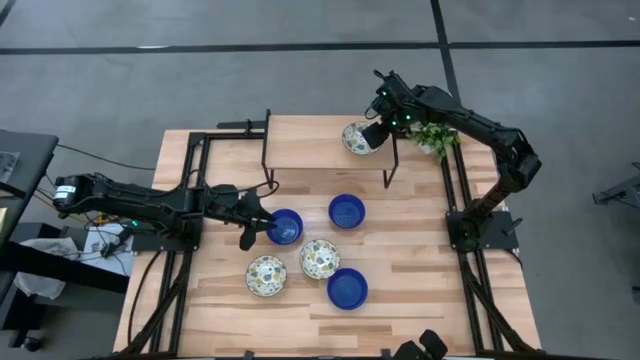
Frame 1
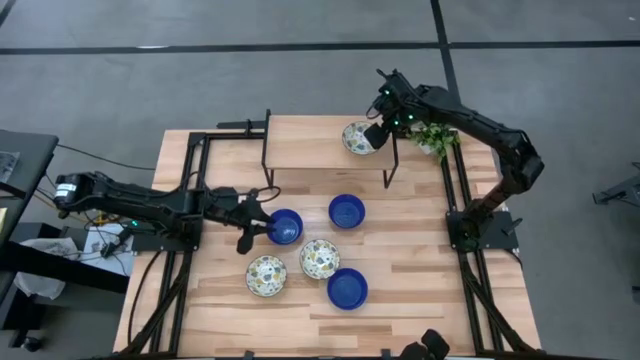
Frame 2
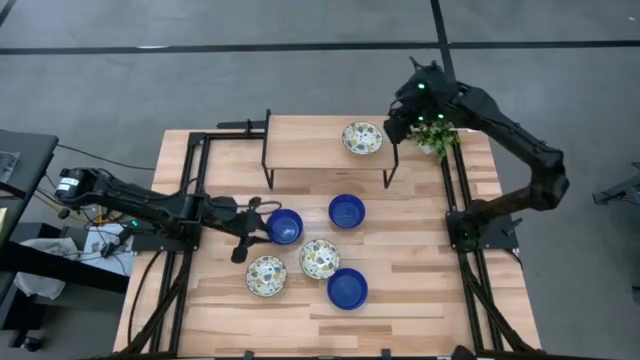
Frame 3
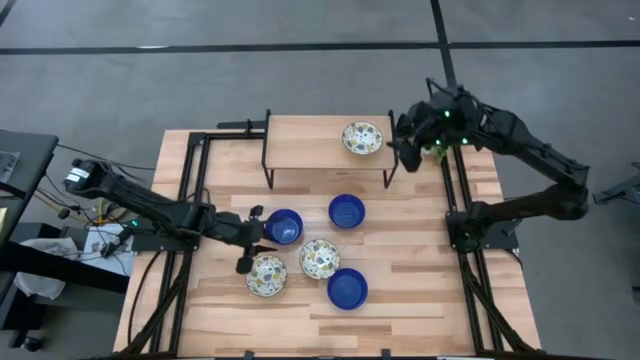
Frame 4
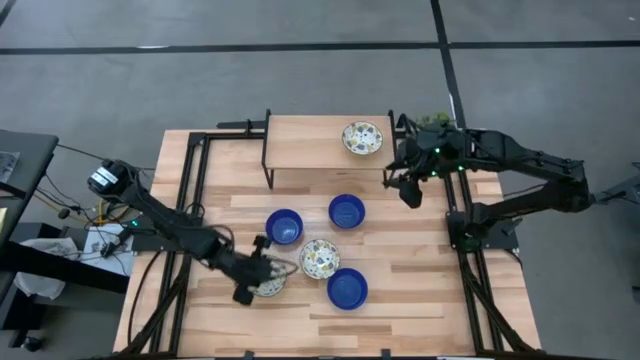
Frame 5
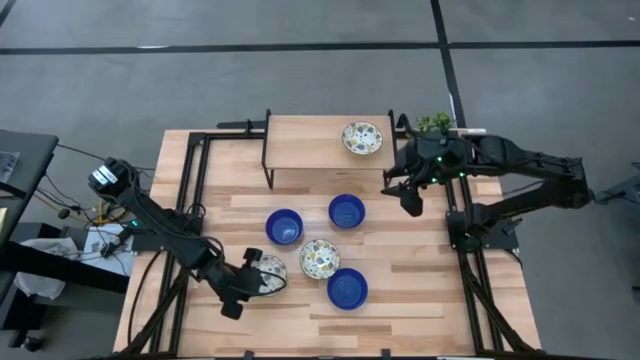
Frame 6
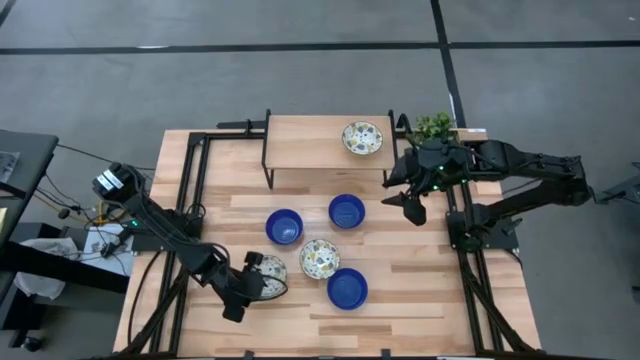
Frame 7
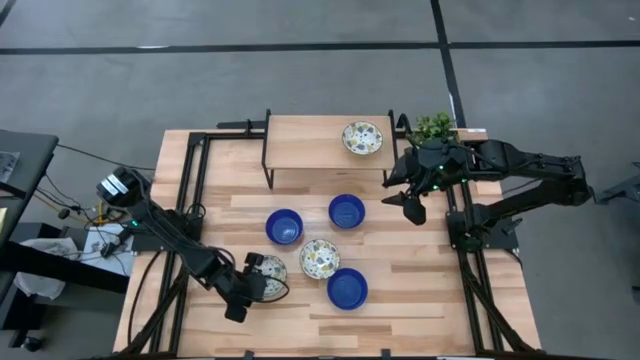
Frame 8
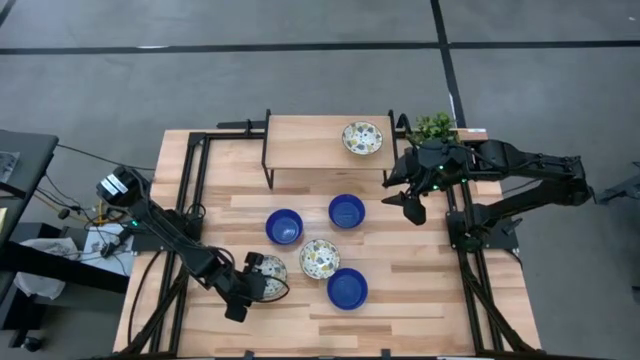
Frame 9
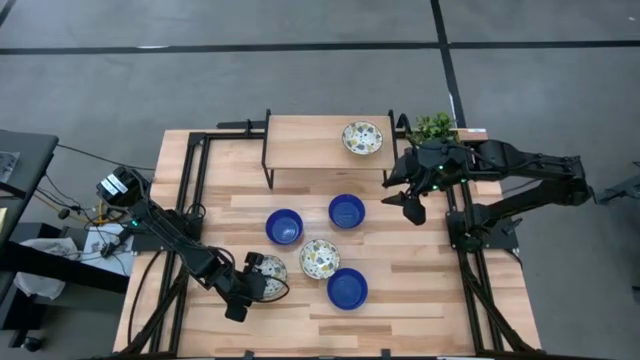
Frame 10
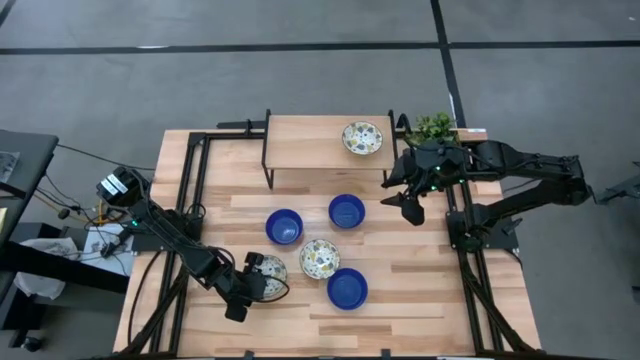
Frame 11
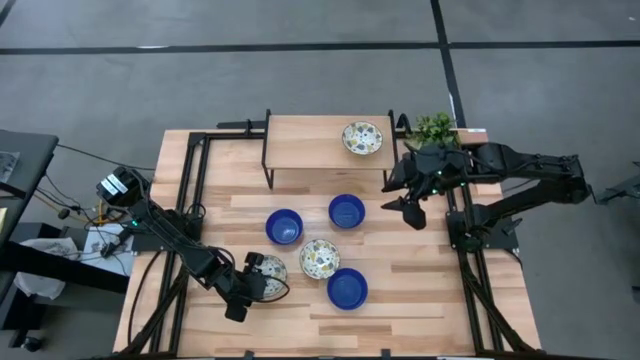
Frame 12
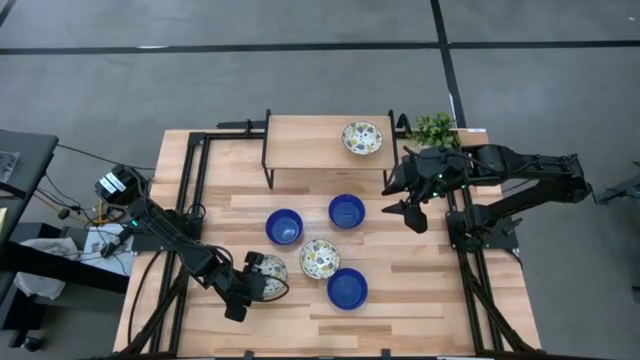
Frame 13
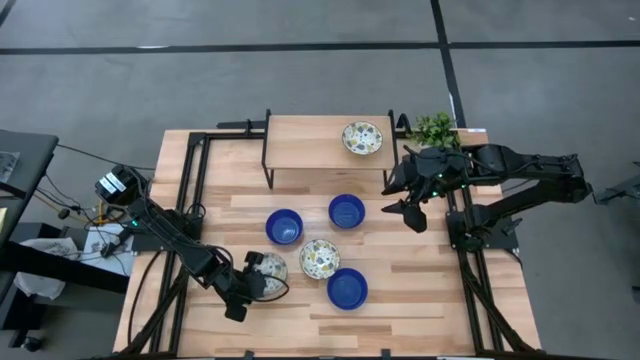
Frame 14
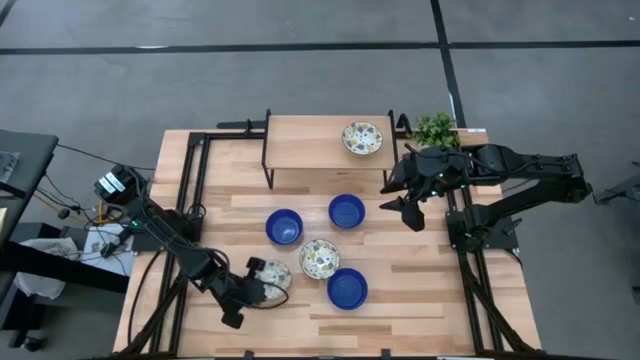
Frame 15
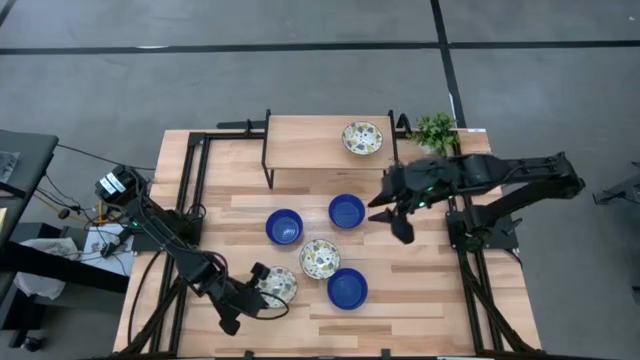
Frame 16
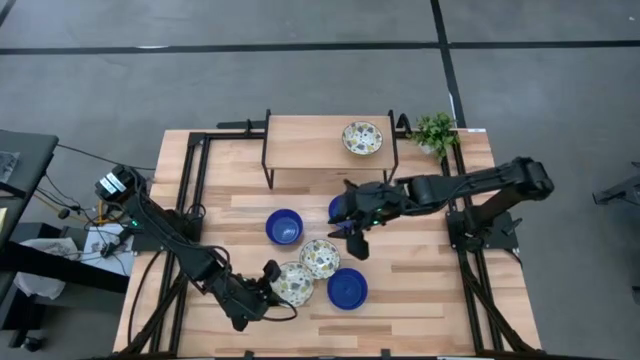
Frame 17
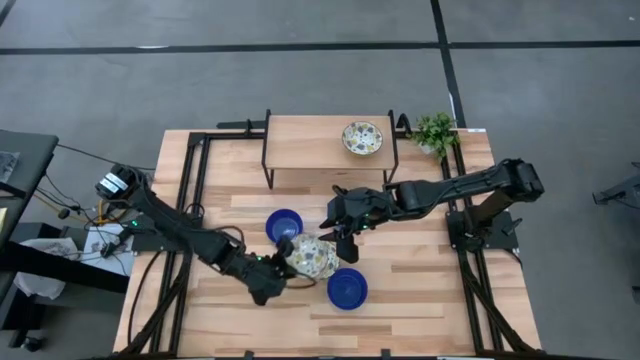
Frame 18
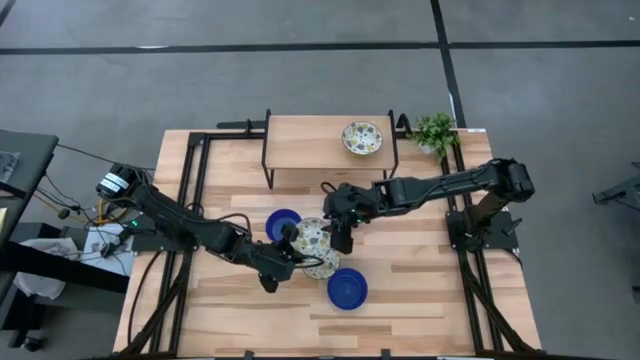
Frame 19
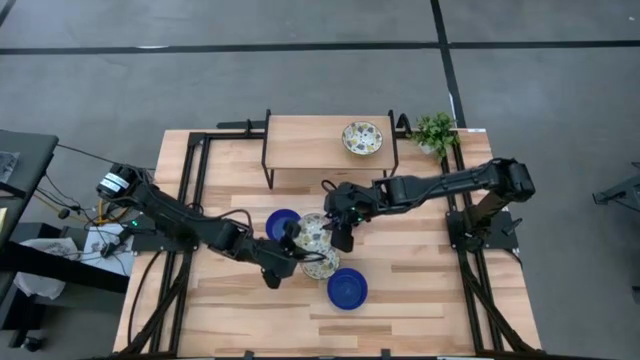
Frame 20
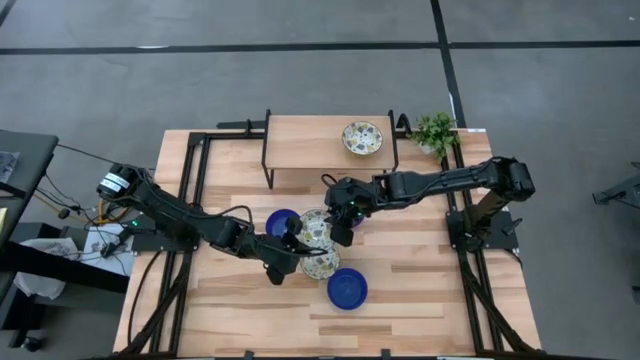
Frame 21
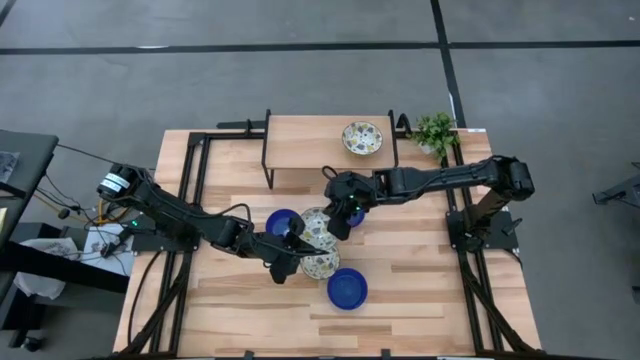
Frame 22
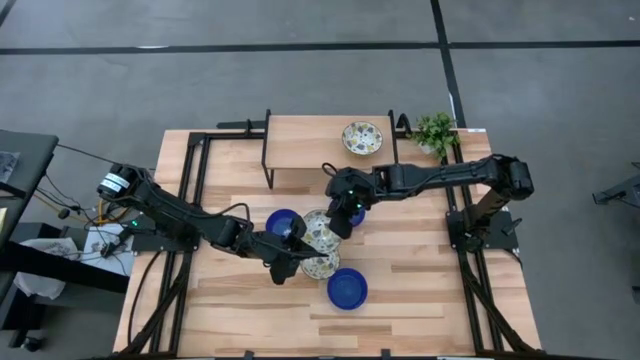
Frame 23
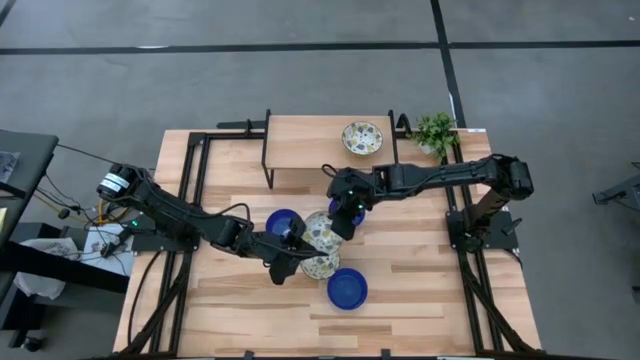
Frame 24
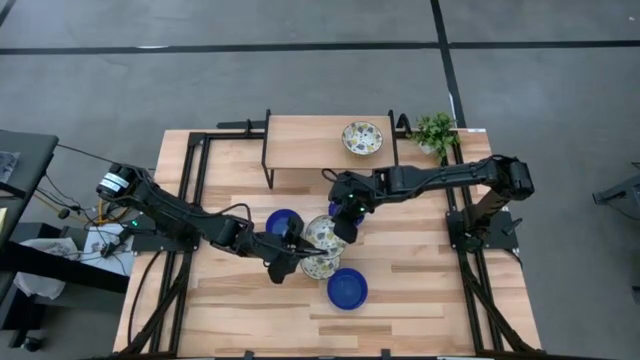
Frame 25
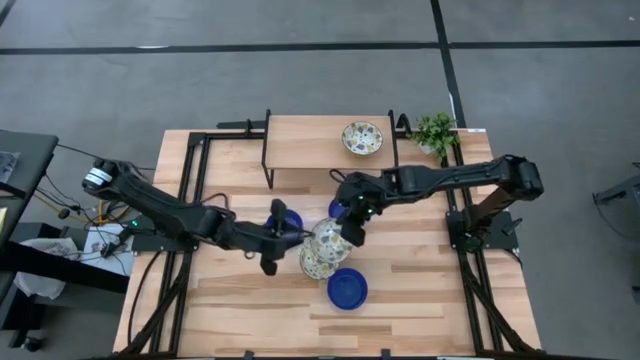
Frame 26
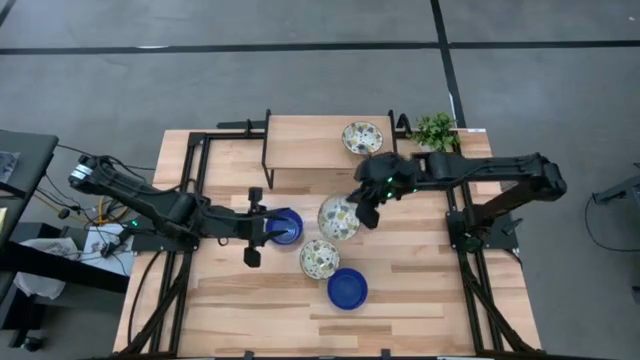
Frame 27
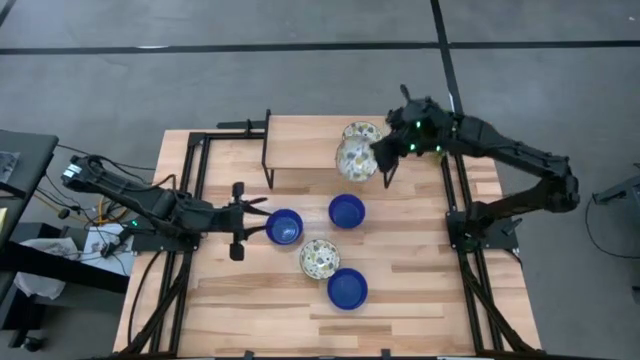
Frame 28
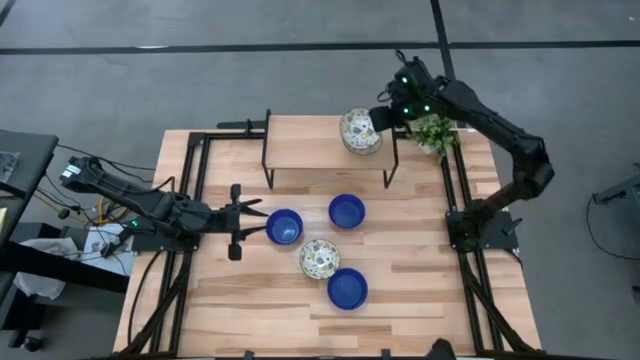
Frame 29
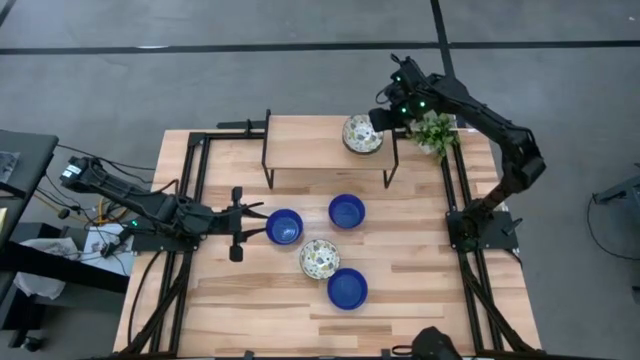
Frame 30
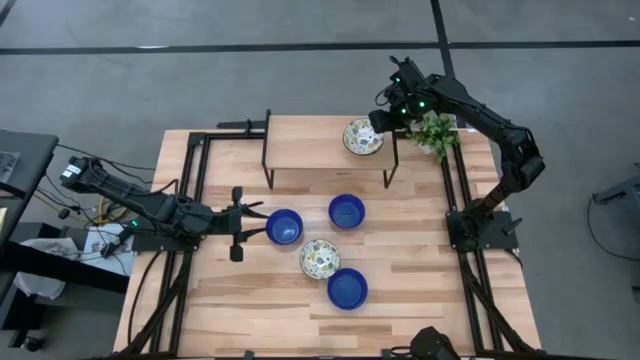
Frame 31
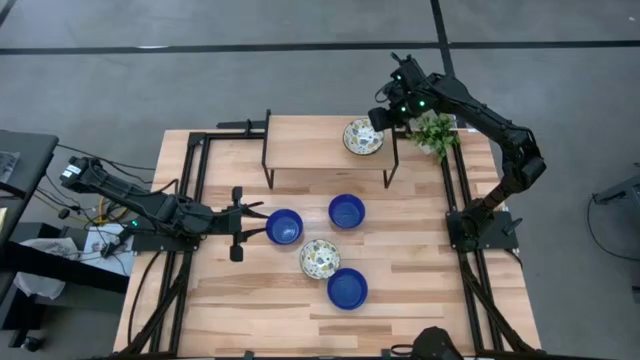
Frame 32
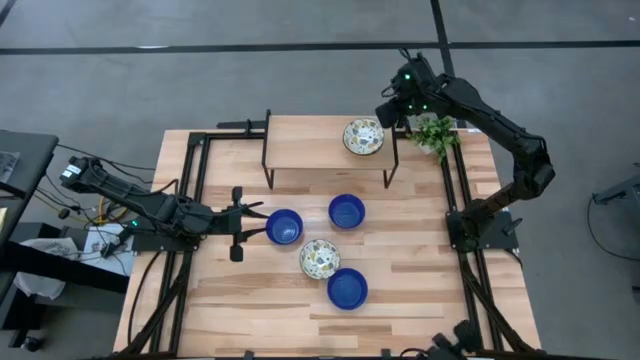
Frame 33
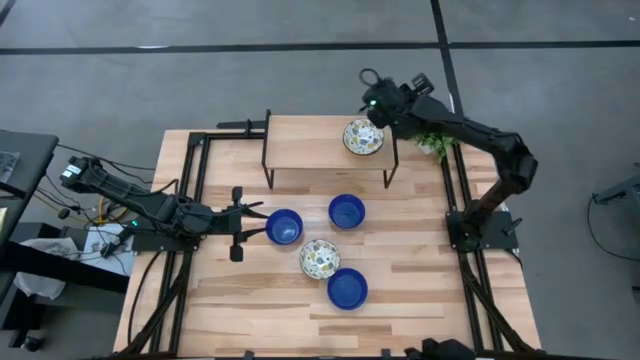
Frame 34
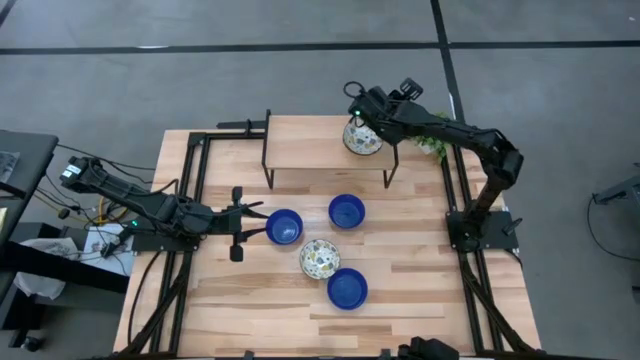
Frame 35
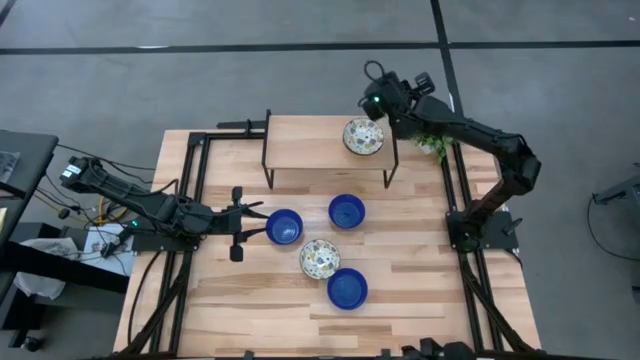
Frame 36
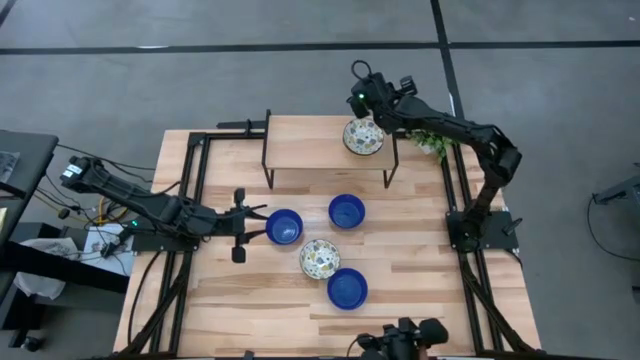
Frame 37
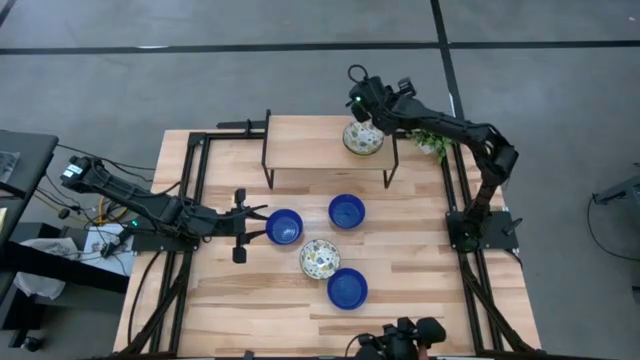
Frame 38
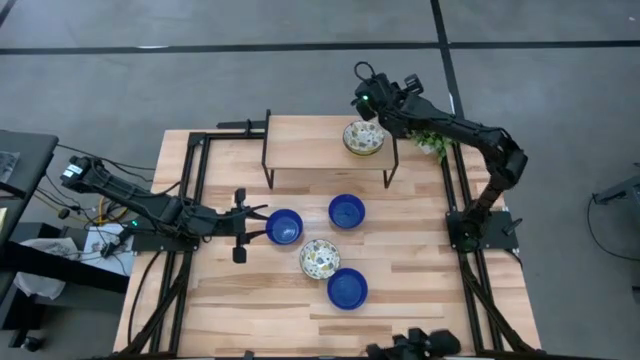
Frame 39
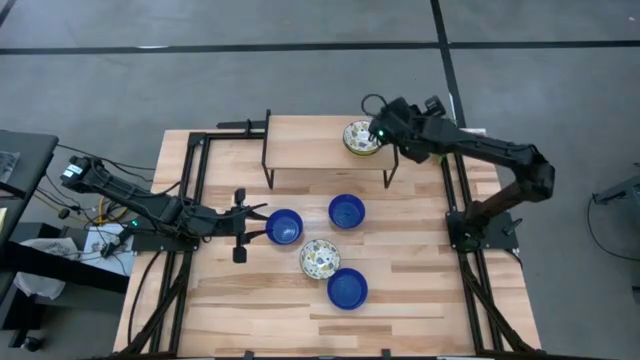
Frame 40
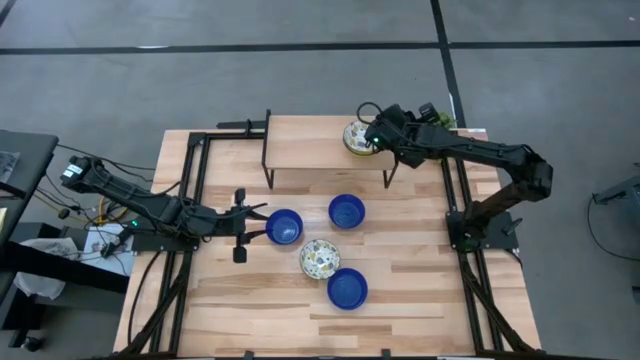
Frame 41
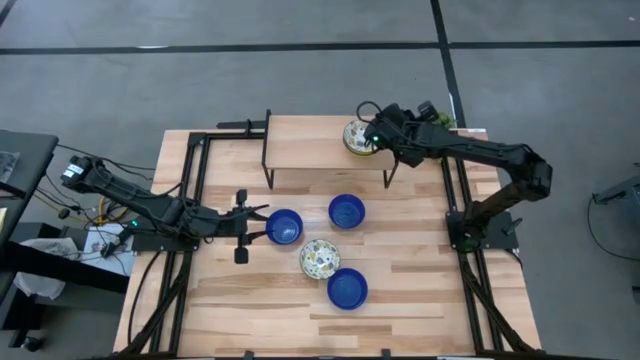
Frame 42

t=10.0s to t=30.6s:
Task: Pick & Place Mini bowls
Stack the left white patterned bowl on top of the white patterned bowl on the shelf
